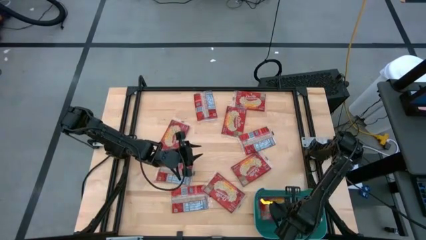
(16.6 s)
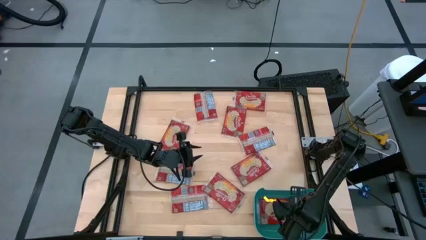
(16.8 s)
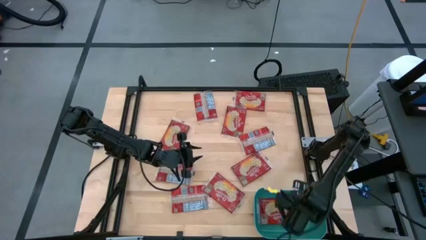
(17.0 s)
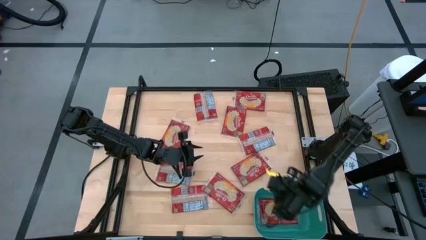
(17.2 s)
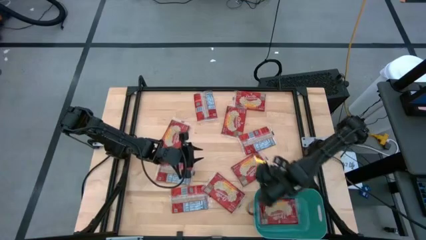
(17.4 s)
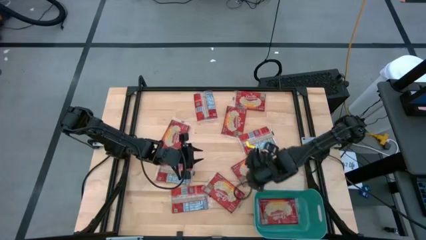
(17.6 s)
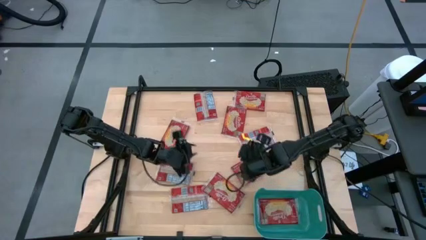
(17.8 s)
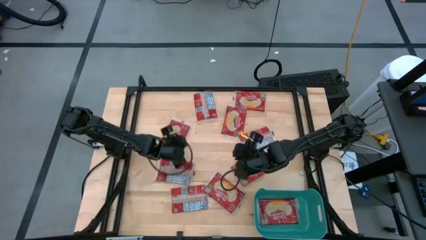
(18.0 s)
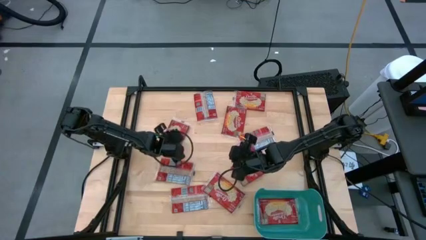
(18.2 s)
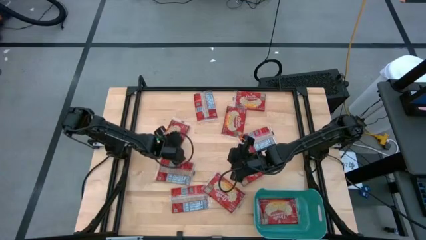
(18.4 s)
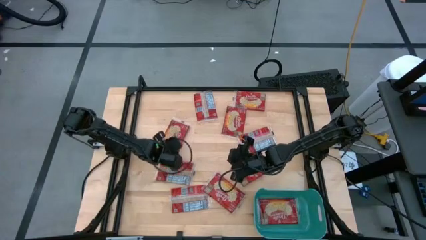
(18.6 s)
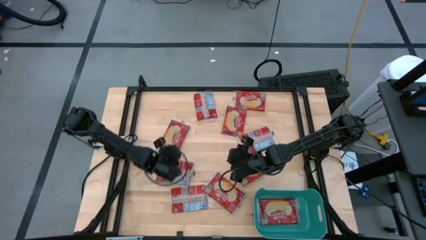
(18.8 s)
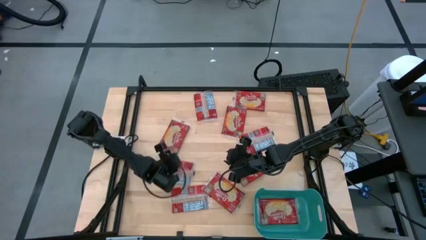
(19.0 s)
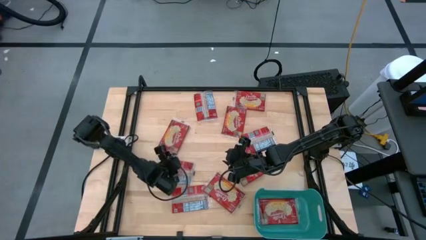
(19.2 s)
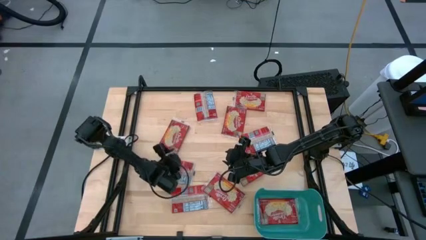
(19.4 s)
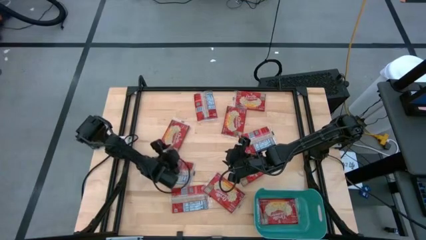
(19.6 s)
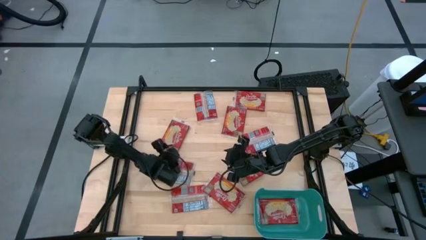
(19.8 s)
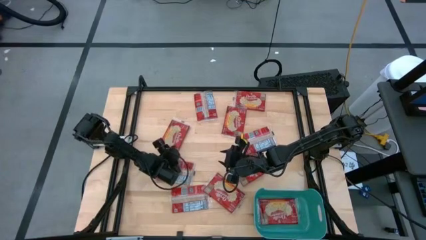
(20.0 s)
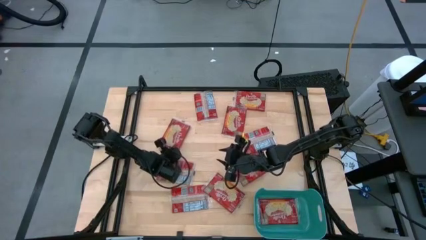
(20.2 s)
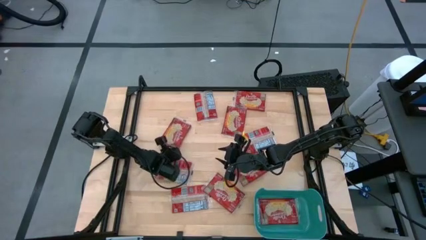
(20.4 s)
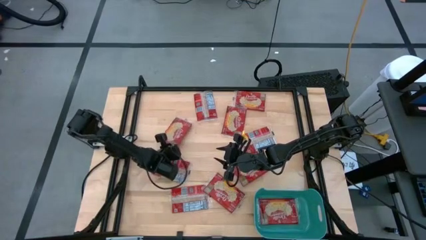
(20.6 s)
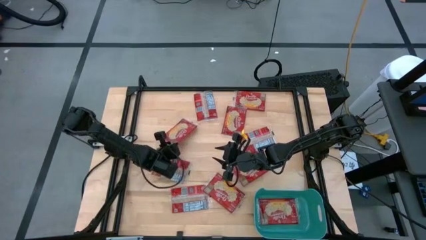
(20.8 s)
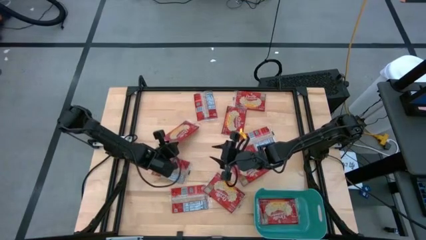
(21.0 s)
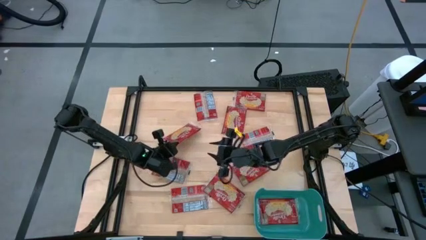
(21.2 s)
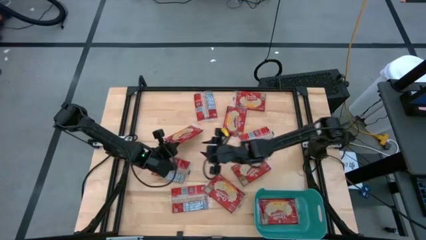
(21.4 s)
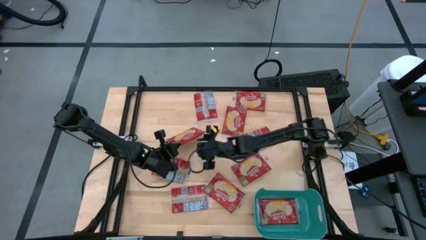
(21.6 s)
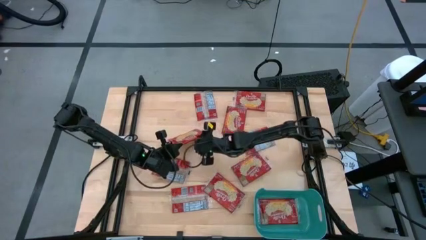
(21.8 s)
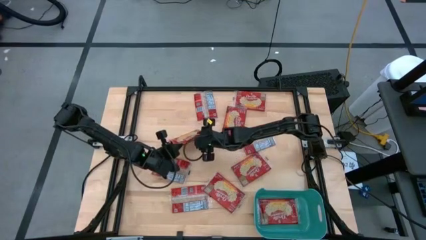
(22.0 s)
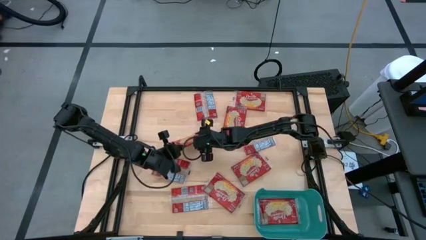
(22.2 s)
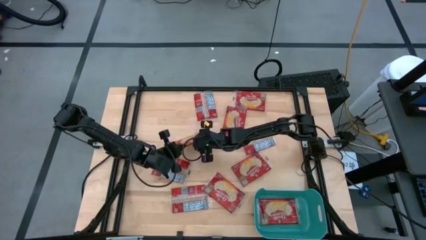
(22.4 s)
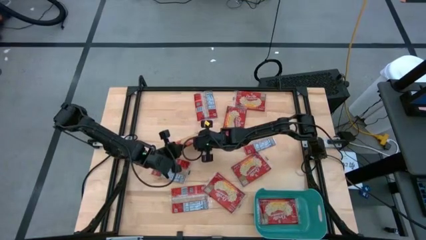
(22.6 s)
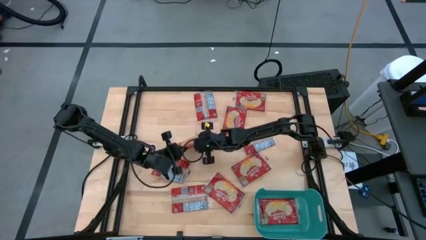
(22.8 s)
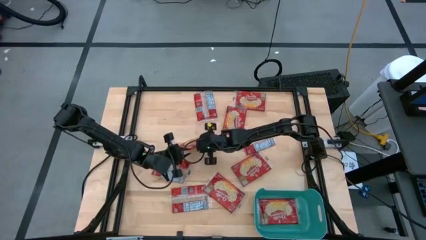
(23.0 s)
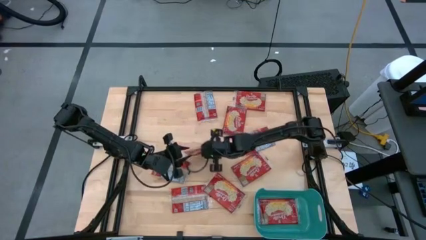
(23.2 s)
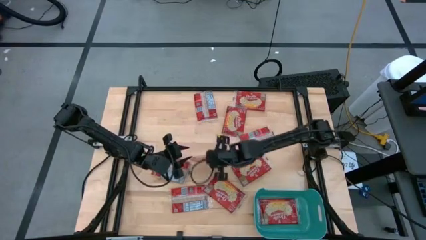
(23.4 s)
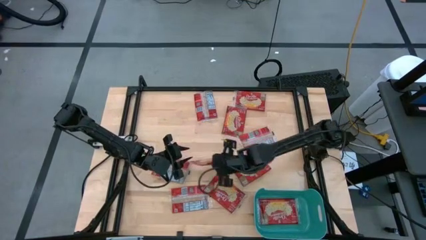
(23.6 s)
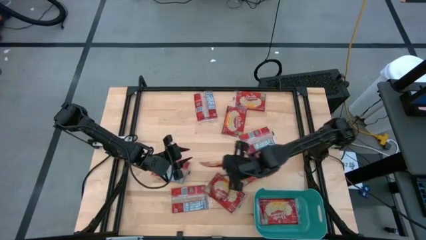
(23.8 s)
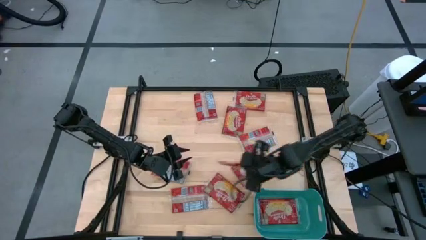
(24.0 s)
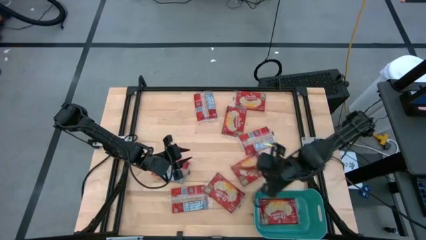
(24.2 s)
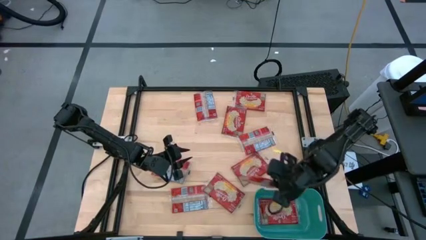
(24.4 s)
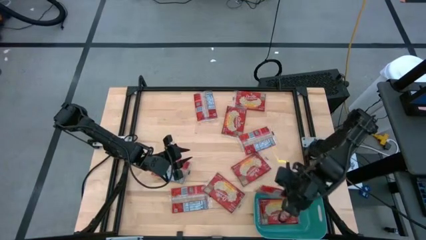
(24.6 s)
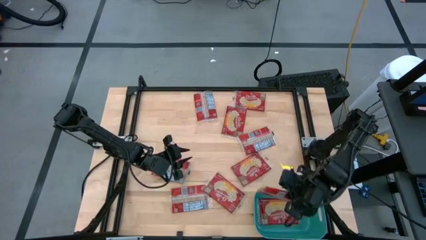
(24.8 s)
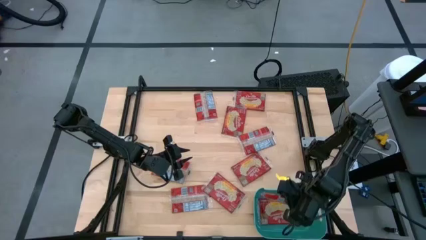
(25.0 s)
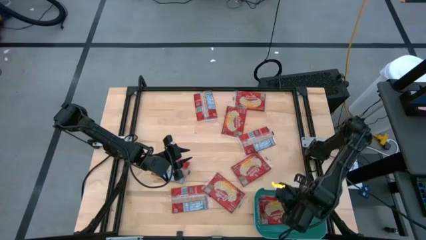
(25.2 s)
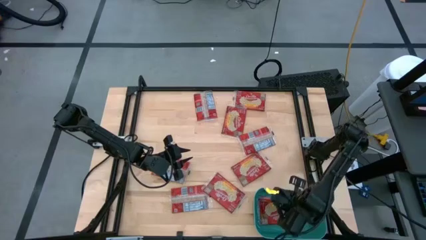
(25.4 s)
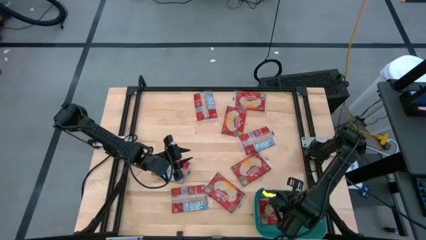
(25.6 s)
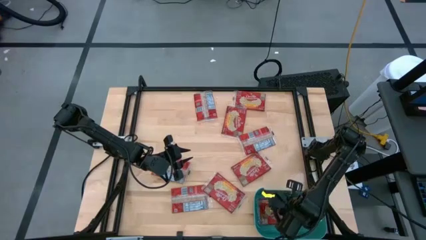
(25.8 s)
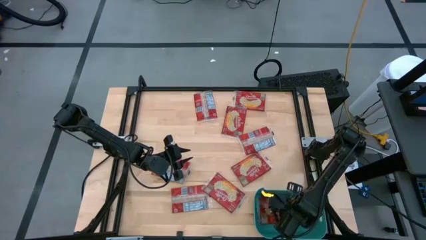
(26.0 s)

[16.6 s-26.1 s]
Task: Sort popcorn bags into baskets
Put the popcorn bag into the green bin

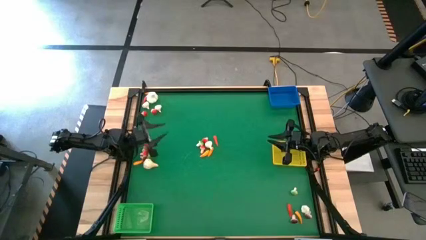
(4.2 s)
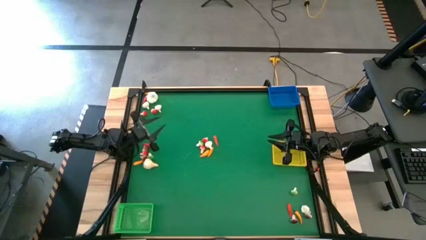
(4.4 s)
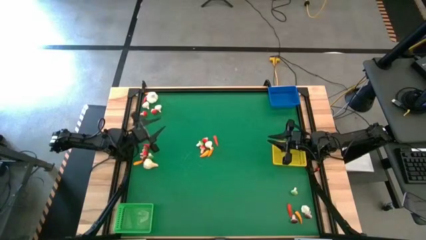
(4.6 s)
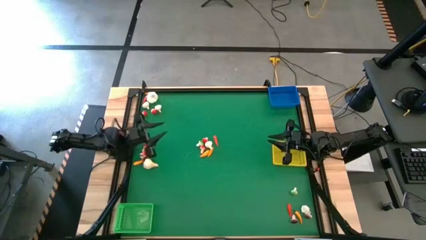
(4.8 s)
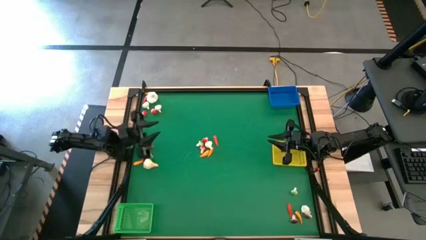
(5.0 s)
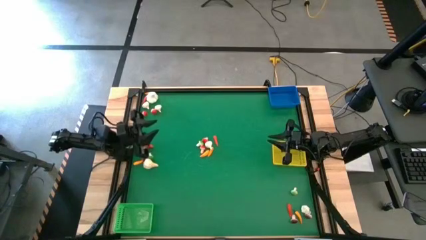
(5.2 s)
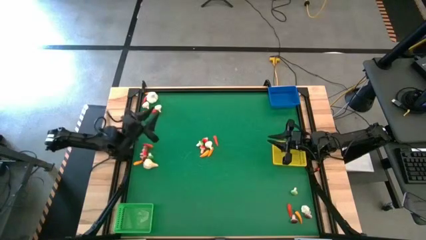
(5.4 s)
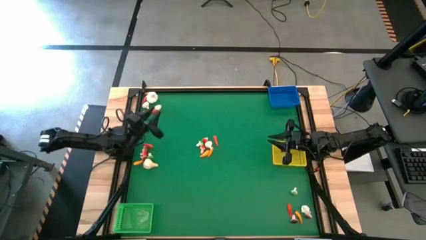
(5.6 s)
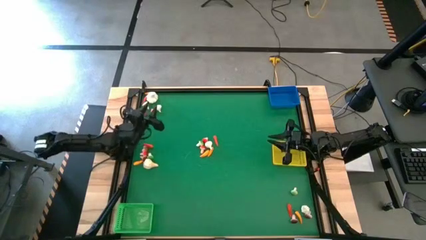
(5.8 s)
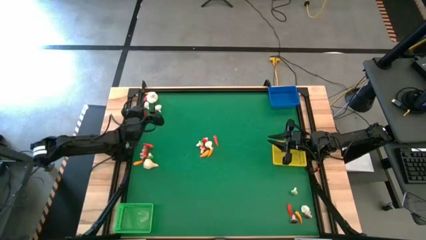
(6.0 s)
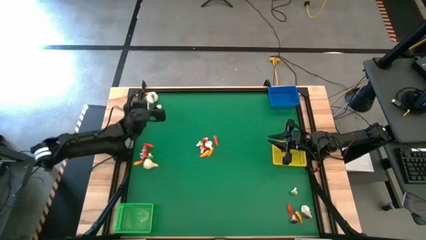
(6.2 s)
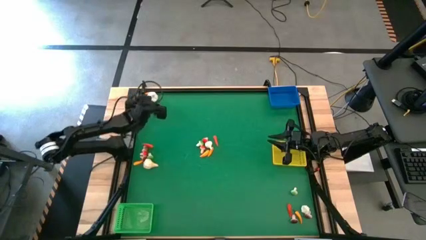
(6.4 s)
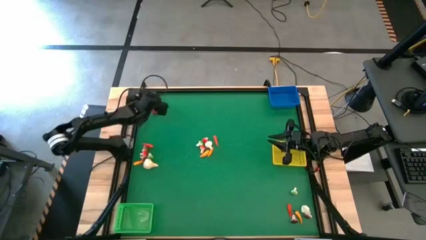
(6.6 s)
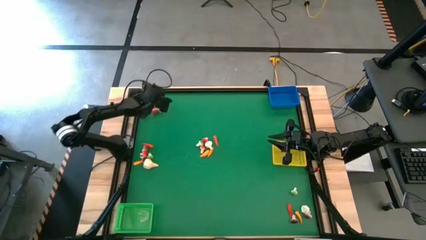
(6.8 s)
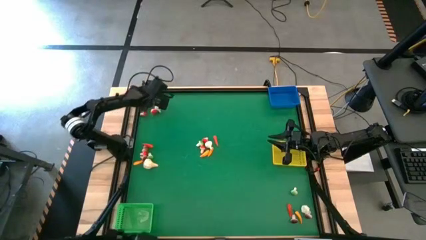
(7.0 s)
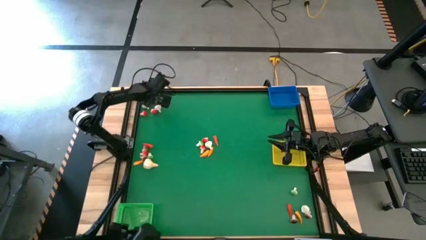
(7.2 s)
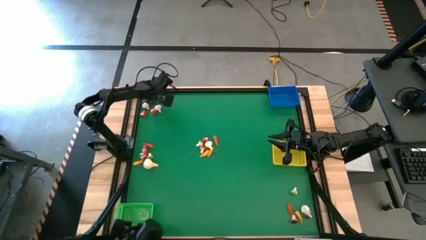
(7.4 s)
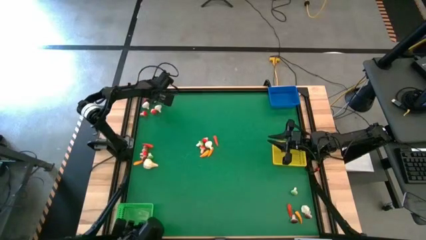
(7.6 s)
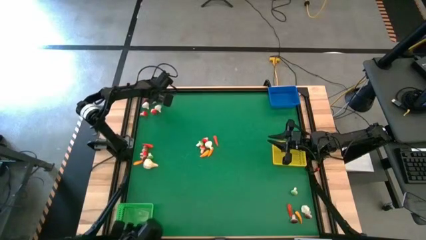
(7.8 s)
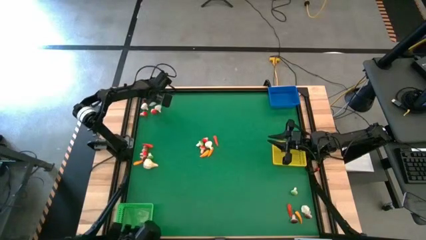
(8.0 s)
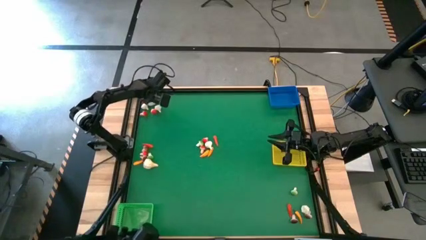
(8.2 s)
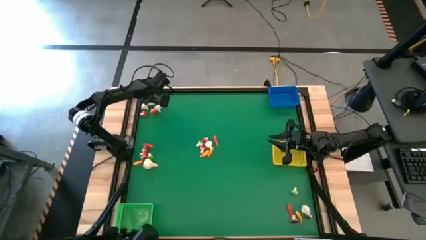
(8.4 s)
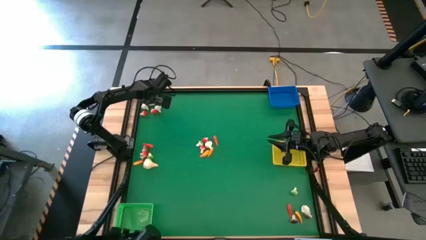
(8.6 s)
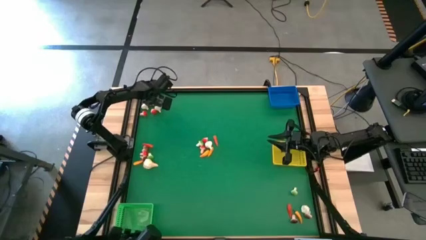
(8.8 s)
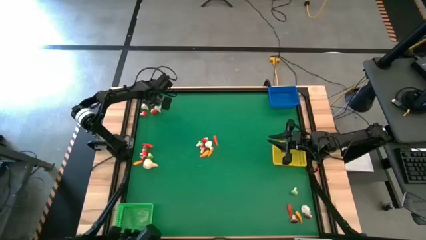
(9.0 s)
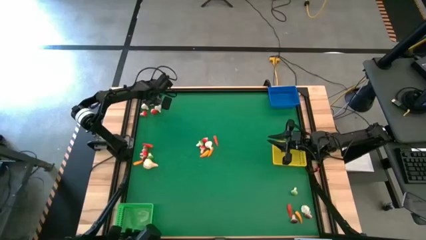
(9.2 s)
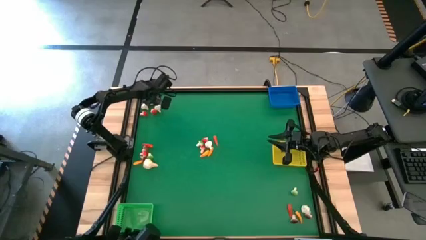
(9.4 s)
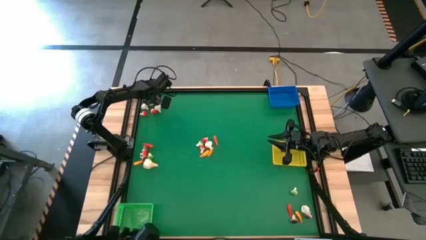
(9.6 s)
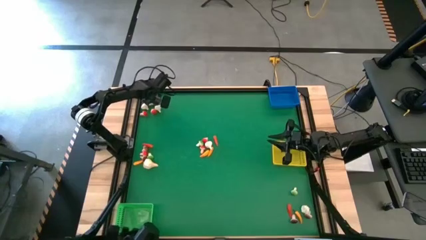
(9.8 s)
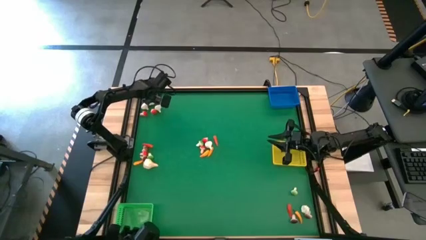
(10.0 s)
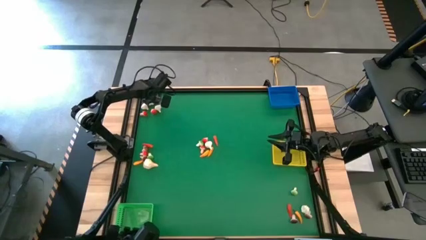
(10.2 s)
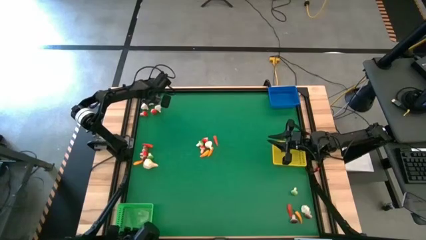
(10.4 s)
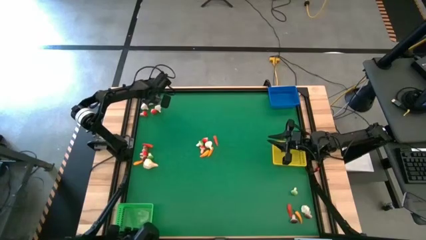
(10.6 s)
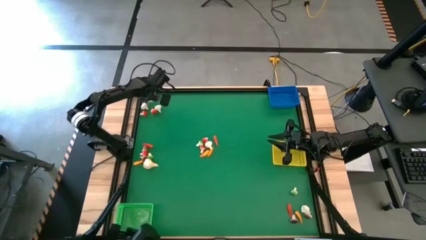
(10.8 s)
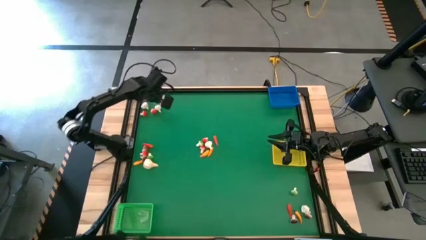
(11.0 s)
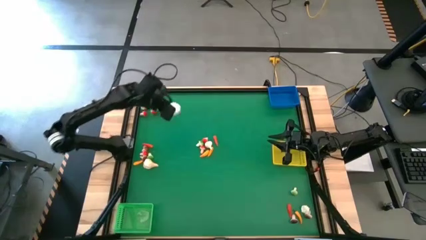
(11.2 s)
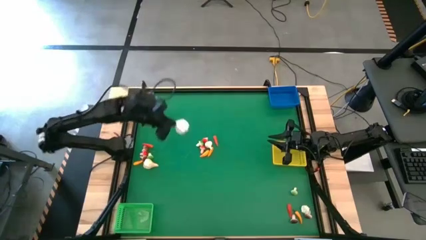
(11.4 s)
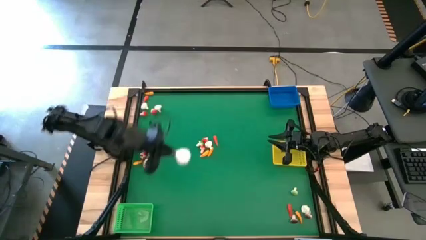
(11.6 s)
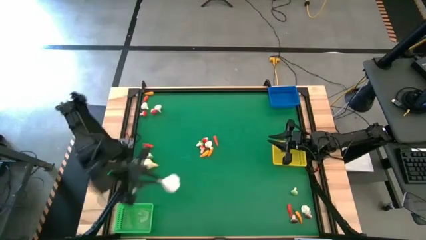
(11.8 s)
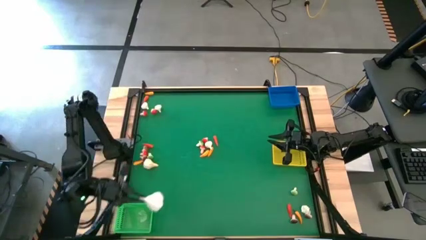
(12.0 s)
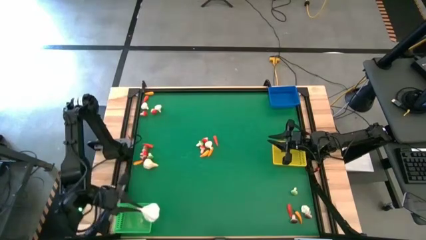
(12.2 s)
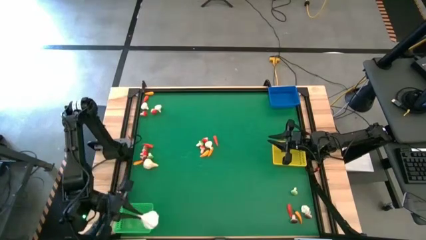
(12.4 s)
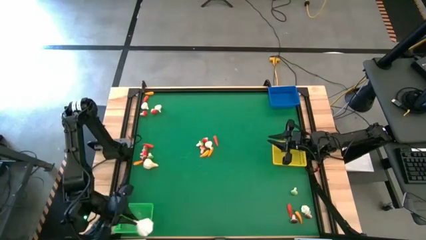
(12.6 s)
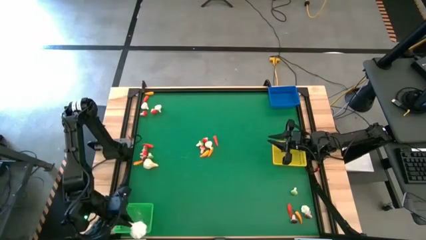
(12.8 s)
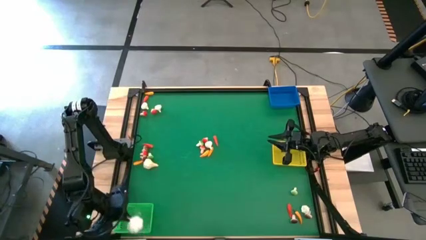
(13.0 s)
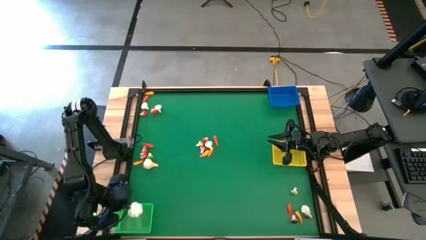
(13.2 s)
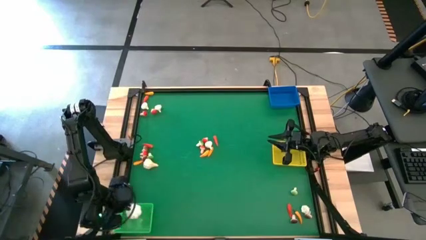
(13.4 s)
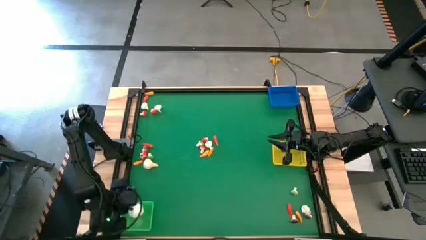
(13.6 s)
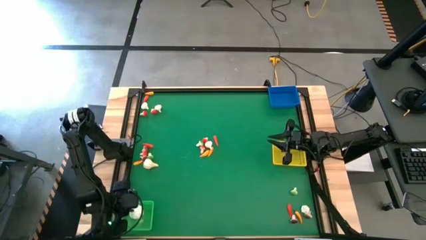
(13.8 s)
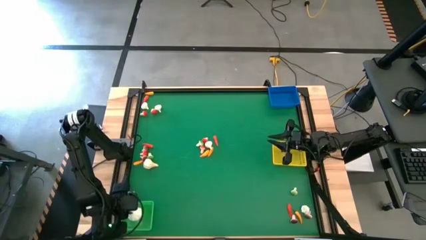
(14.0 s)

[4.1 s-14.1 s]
Task: Sort produce into baskets
Put the white garlic into the green bin
